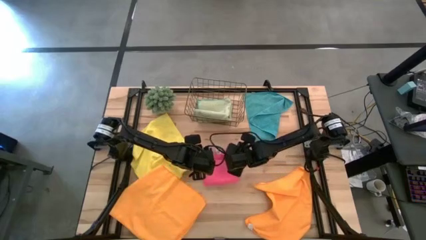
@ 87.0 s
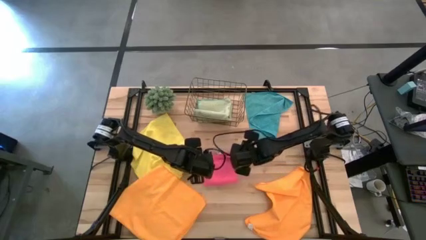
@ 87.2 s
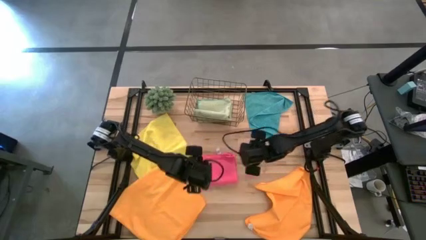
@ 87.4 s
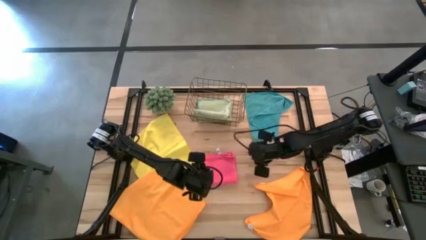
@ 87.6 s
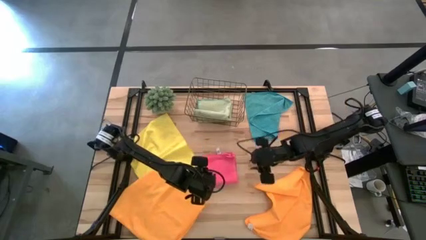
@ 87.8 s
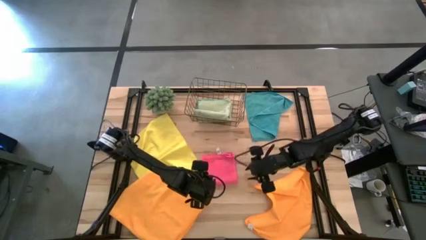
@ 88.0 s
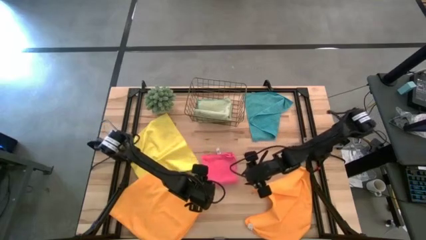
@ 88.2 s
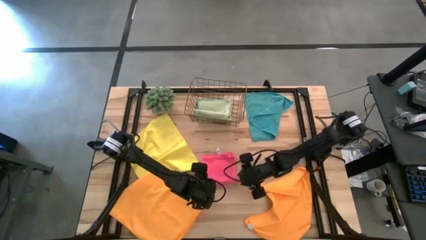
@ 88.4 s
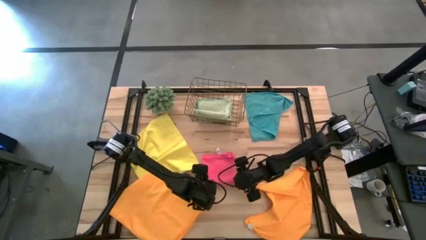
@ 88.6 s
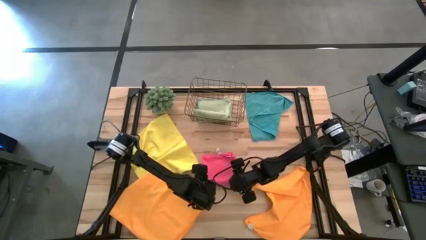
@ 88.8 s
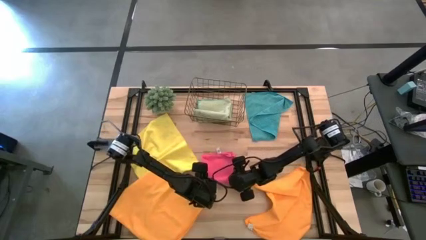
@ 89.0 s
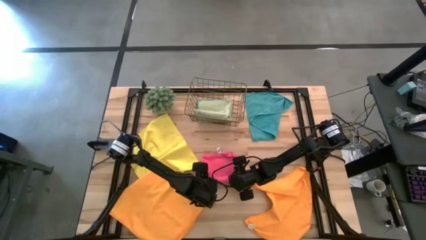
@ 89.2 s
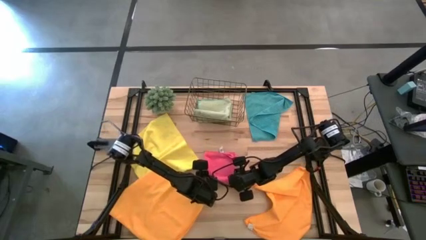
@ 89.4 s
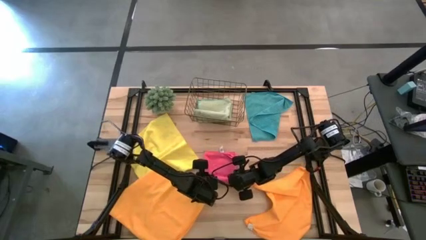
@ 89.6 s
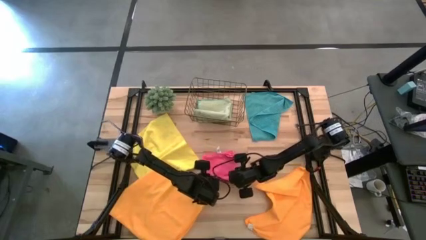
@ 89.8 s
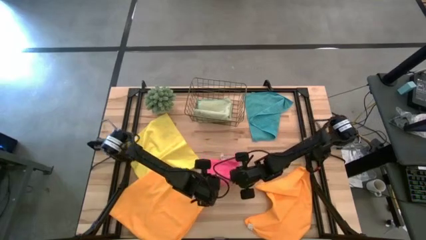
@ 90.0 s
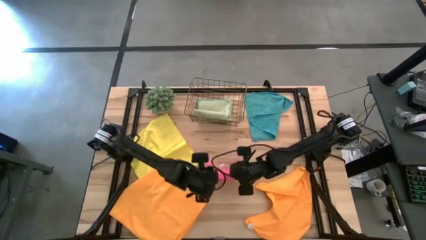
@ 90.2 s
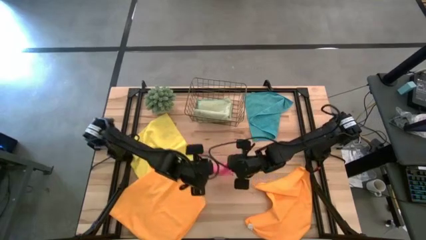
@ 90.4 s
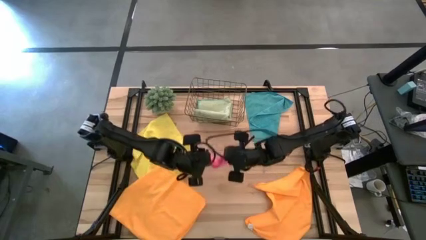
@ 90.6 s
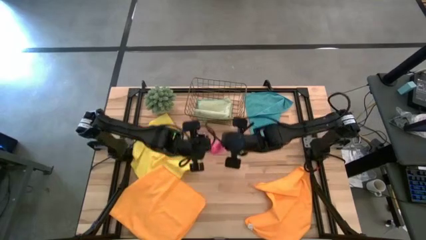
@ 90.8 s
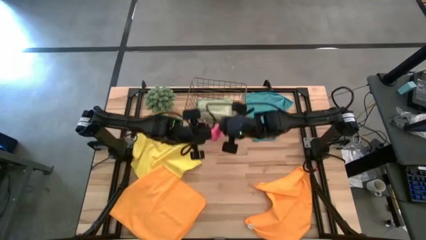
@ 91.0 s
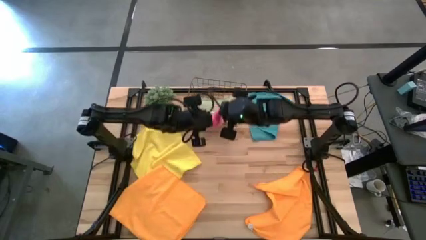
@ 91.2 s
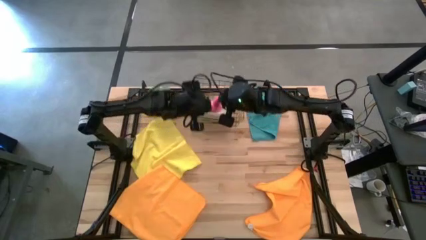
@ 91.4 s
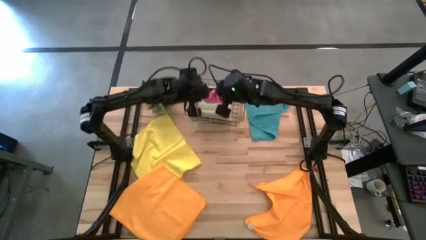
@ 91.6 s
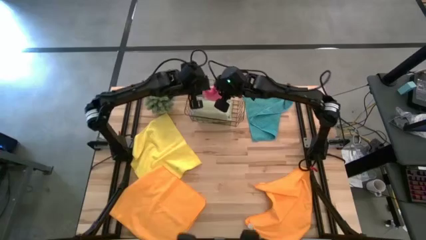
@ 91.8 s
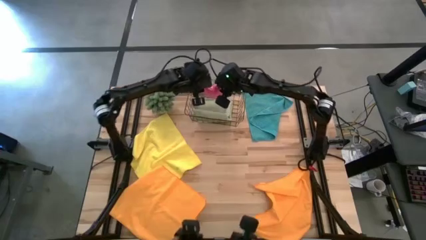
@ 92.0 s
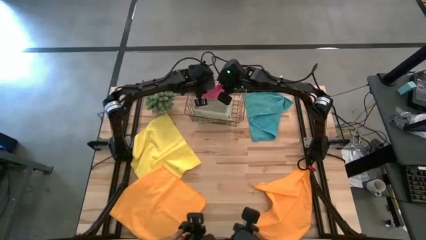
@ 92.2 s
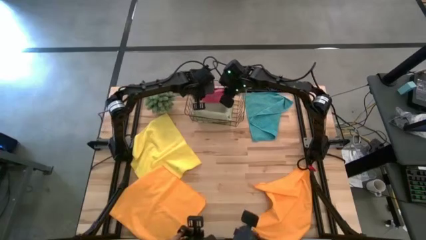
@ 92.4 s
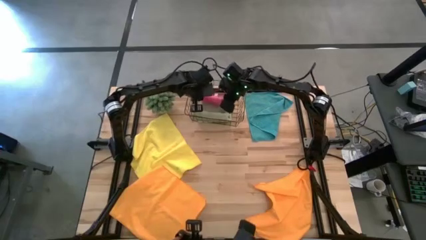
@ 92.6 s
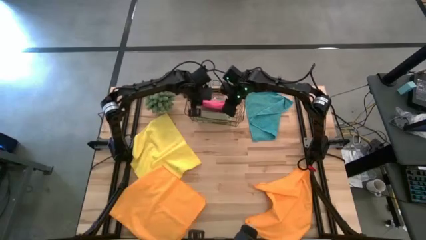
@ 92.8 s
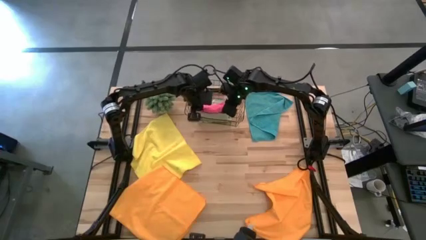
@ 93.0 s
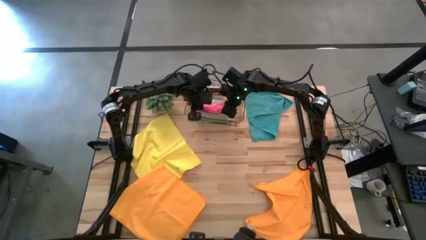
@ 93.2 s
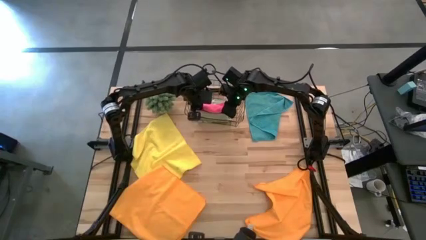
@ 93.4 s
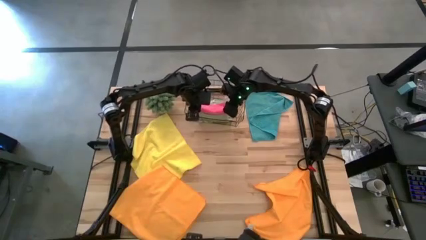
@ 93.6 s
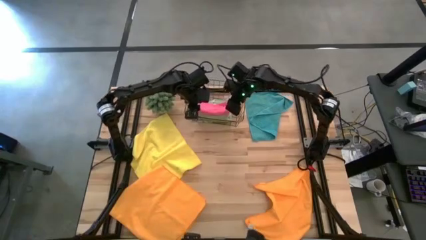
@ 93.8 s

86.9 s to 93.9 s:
Task: Fold microfiber towels
Put the pink folded towel into the wire basket

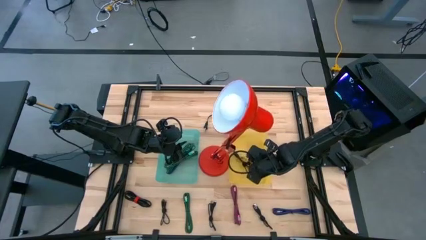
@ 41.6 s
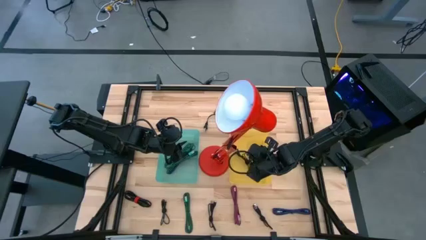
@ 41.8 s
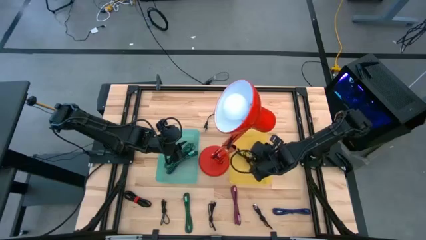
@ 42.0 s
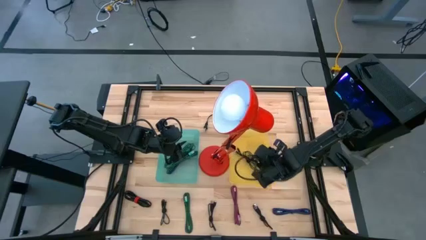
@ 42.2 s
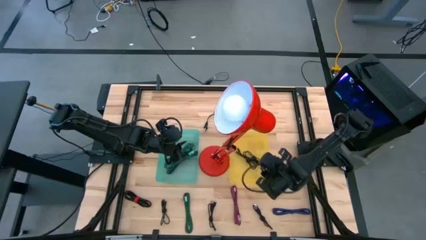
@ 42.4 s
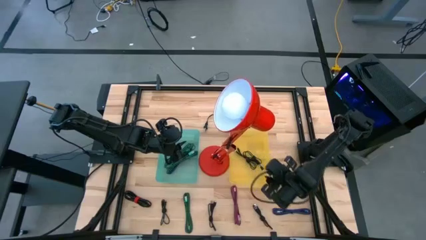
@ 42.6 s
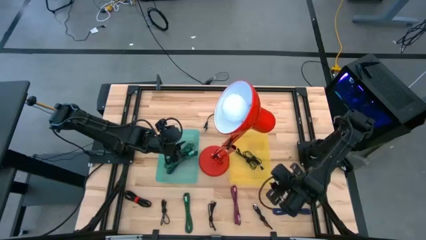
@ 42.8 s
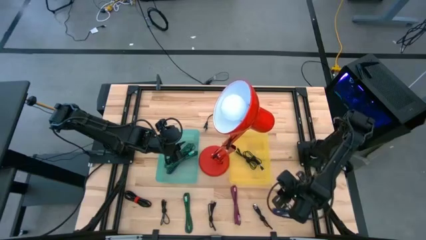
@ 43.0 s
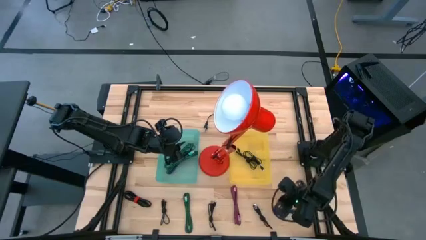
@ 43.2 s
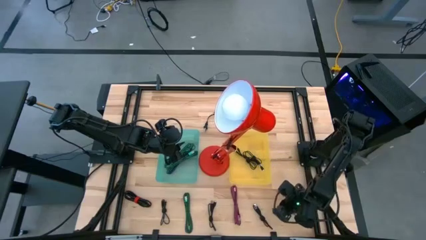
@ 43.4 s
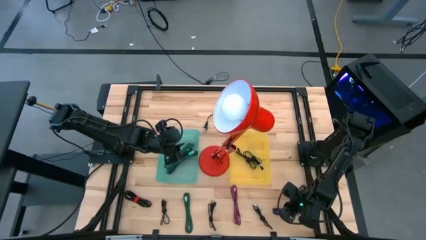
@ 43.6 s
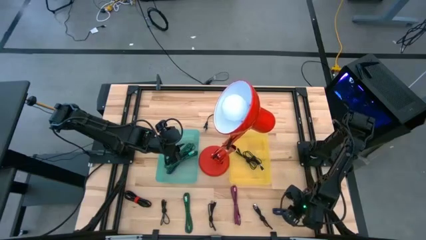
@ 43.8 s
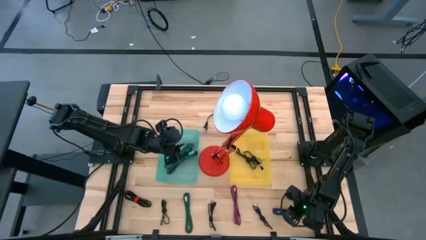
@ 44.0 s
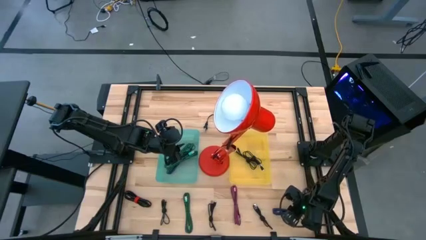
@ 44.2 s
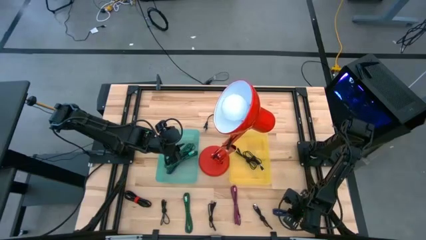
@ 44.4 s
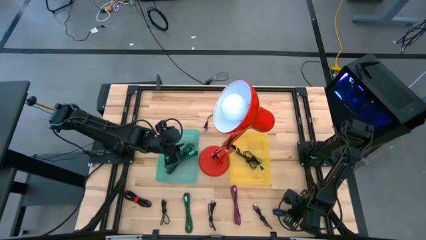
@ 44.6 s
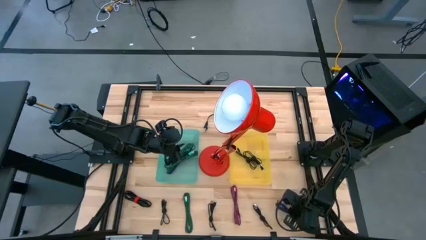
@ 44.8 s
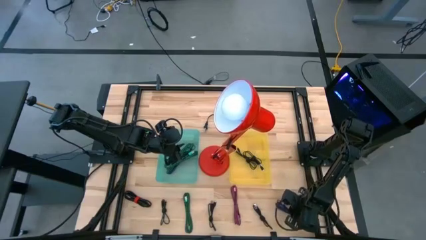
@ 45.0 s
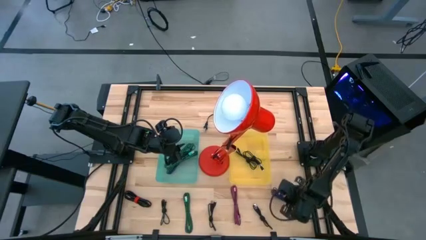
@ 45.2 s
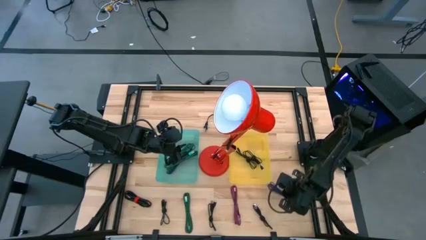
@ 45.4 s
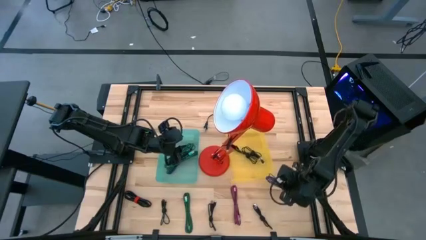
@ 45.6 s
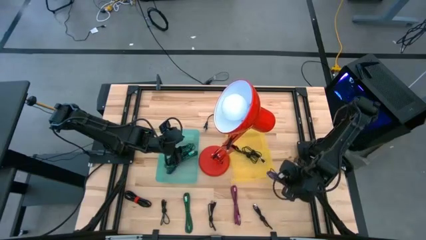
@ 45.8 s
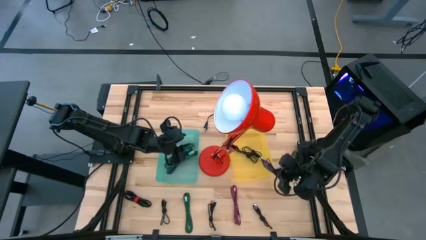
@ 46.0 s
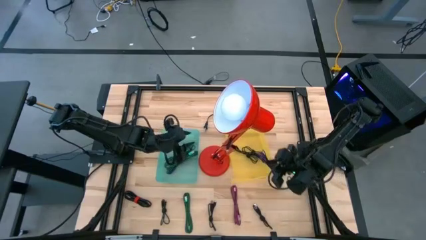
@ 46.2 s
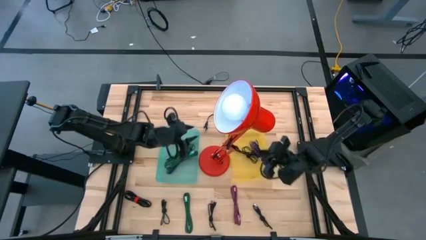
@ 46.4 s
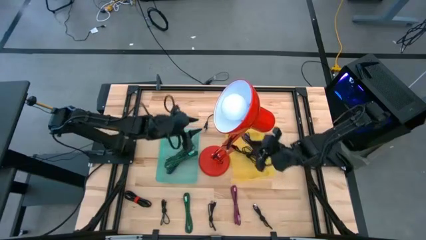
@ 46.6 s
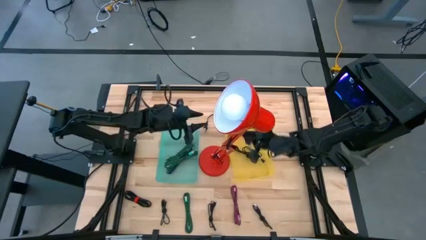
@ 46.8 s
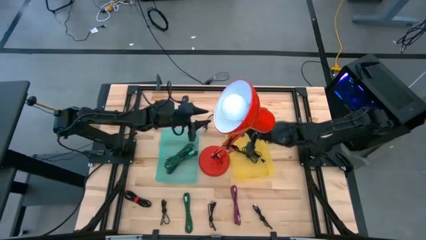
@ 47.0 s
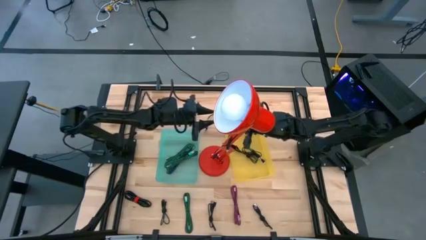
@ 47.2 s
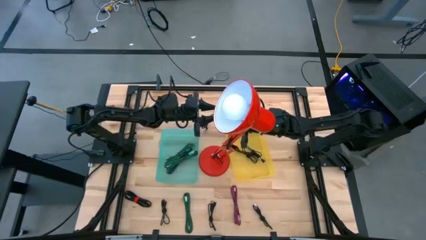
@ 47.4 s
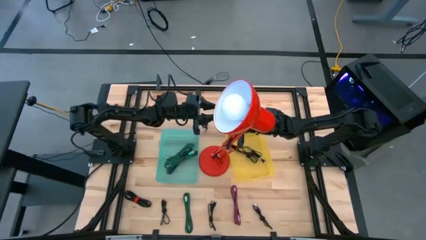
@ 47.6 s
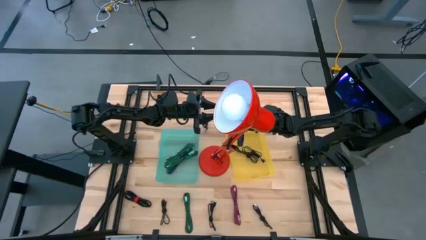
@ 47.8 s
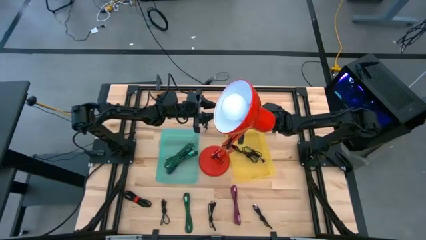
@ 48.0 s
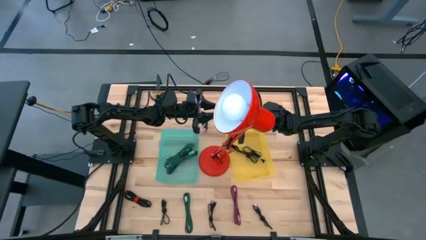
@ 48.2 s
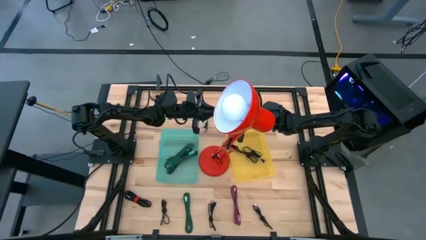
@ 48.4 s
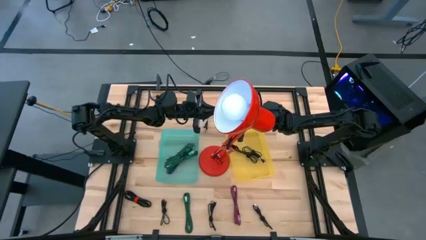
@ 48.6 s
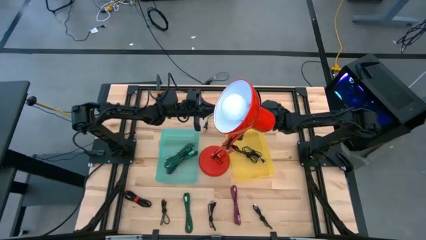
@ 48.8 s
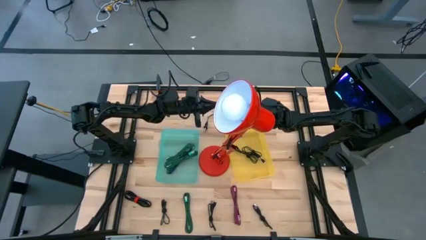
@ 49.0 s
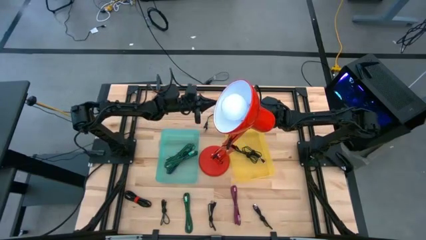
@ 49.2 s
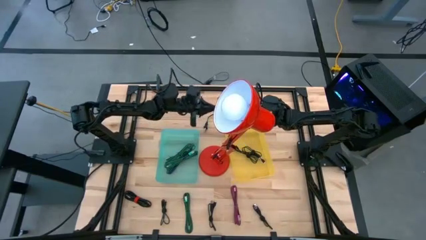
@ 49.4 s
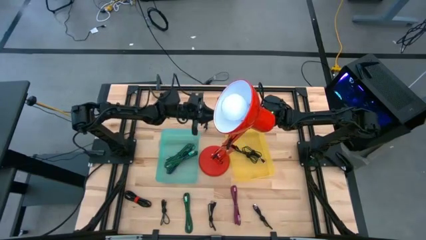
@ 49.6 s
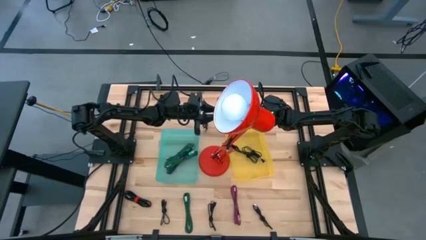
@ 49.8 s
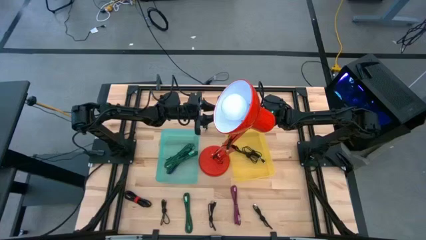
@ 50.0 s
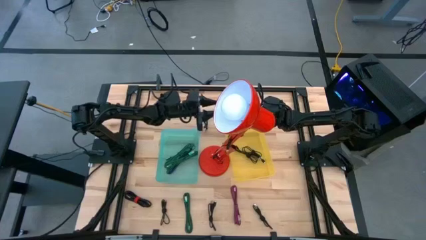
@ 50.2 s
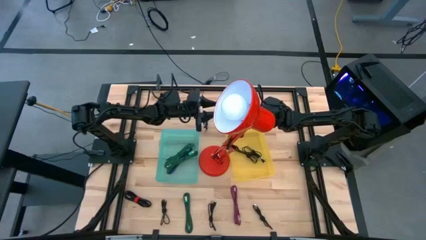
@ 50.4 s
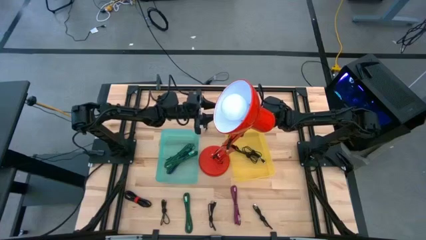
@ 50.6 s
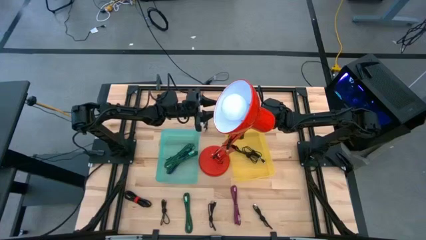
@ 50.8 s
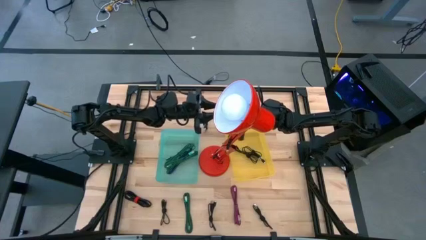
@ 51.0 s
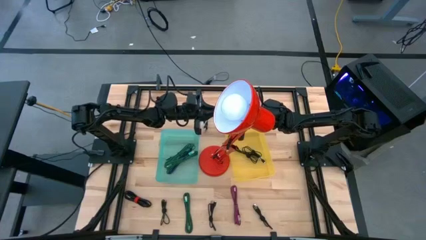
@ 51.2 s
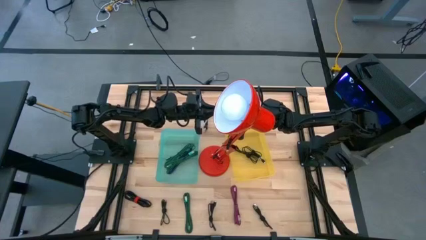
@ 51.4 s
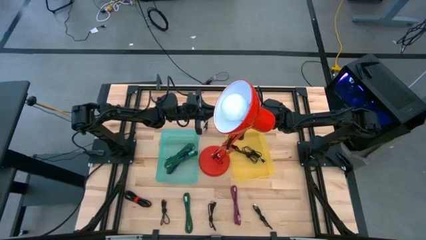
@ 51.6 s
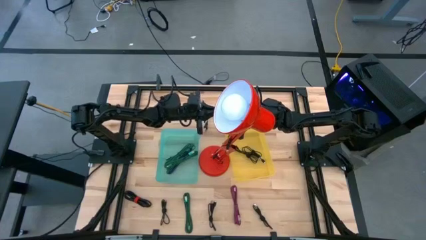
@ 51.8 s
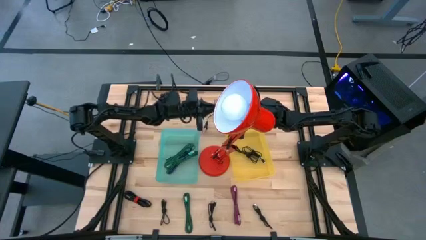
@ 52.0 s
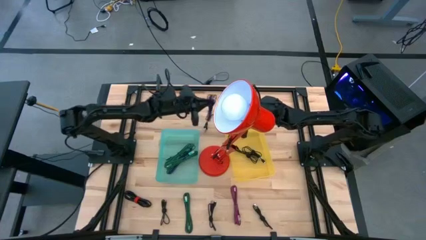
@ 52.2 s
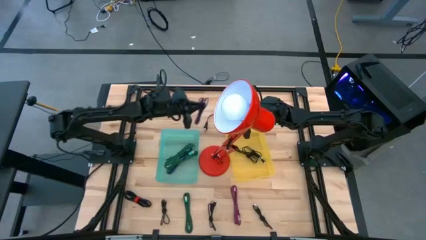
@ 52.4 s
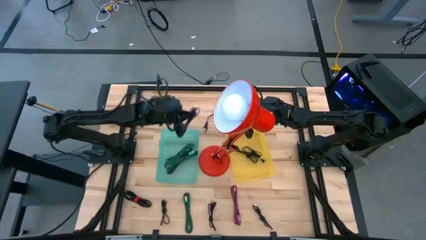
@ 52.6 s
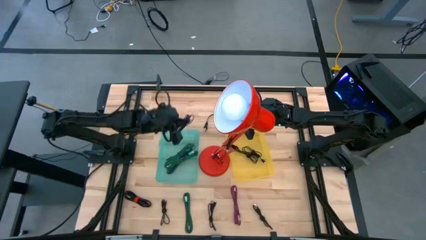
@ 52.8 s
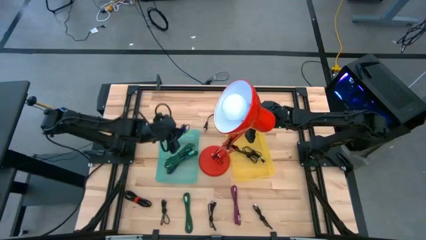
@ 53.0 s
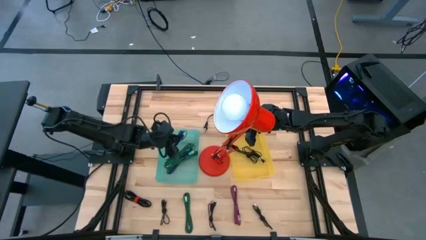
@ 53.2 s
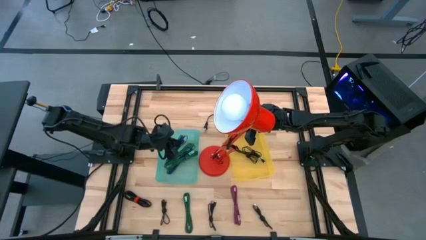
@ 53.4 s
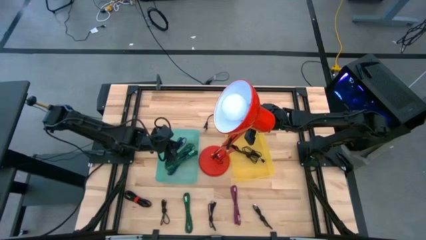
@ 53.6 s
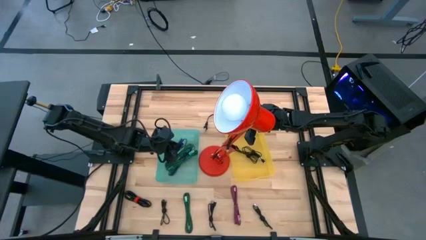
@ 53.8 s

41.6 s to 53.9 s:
Task: Pick & Place USB Port
Put the blue patterned charger cable into the blue bin
